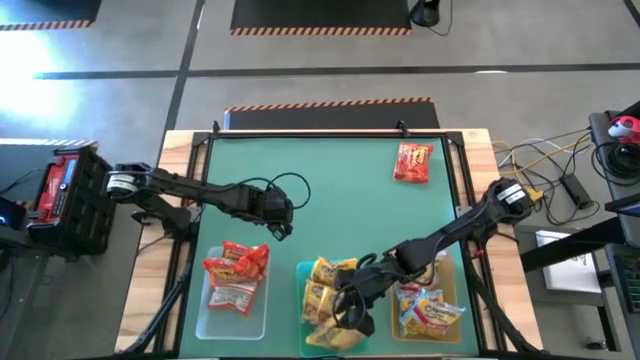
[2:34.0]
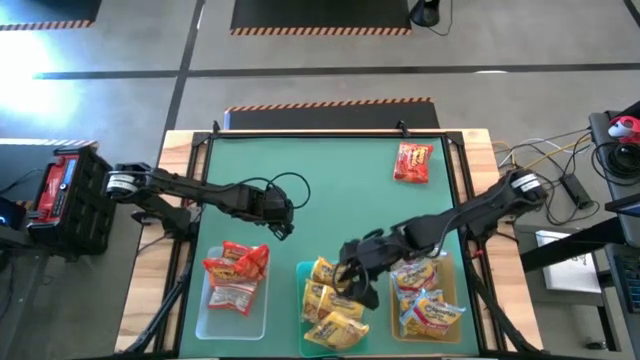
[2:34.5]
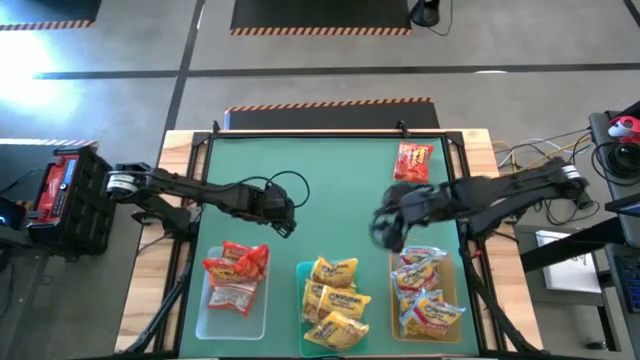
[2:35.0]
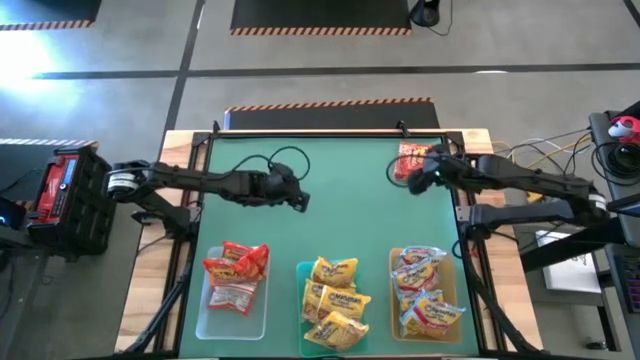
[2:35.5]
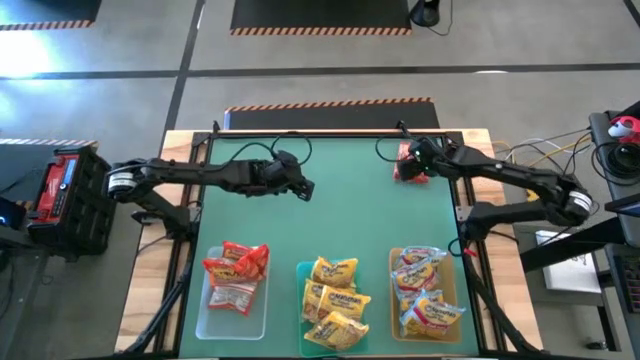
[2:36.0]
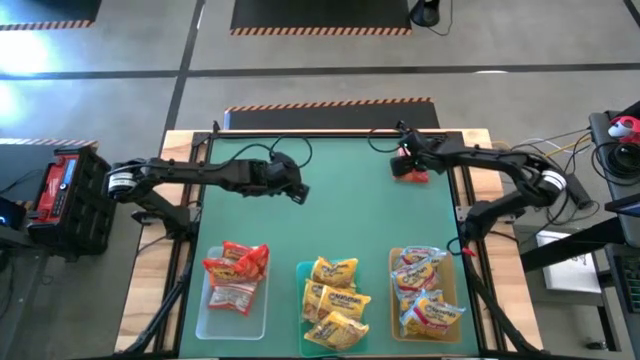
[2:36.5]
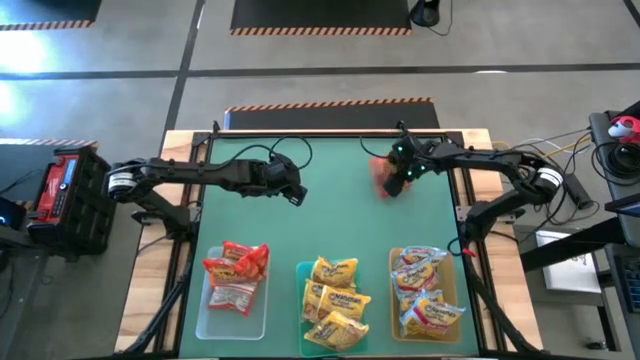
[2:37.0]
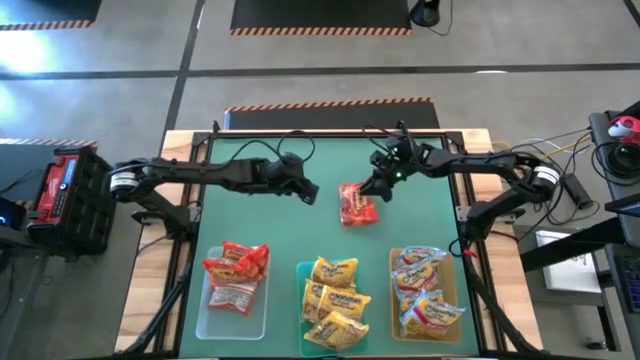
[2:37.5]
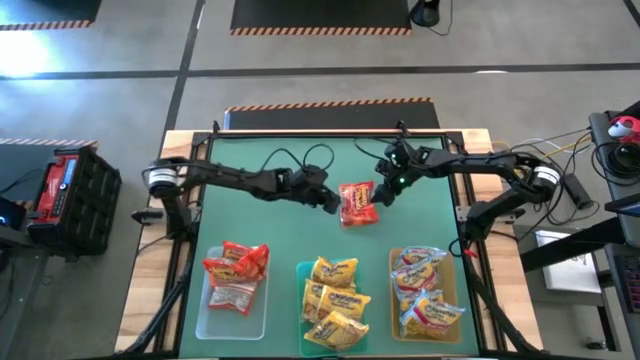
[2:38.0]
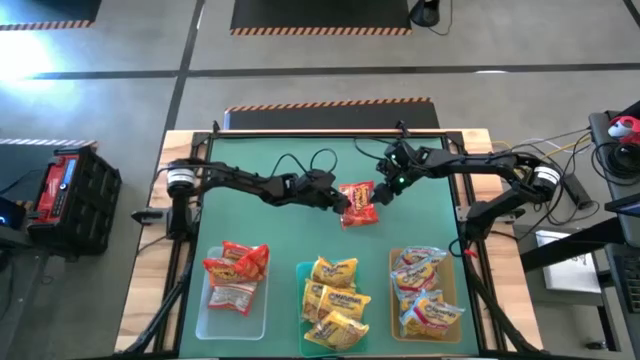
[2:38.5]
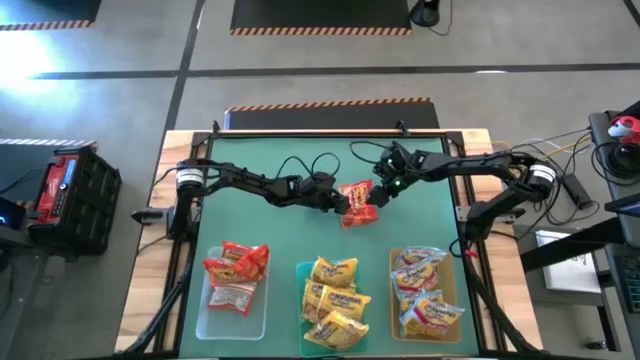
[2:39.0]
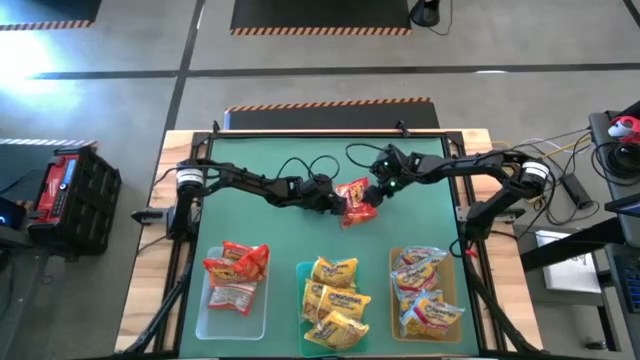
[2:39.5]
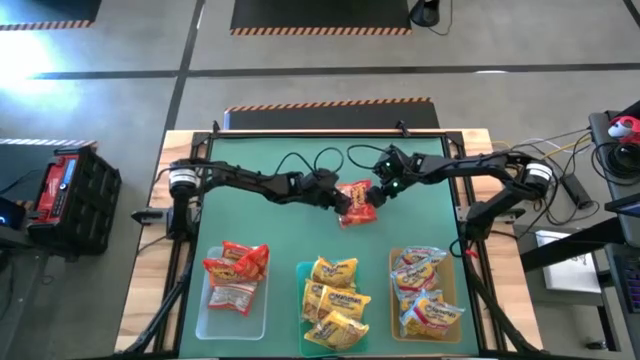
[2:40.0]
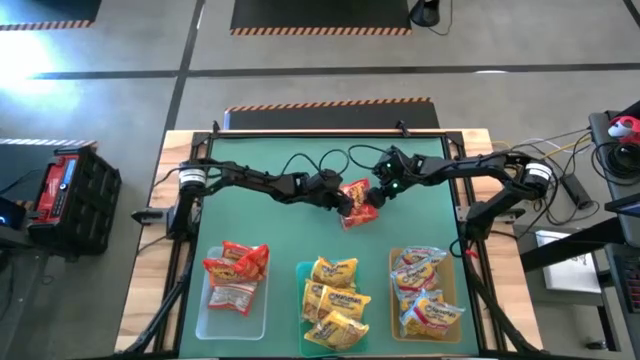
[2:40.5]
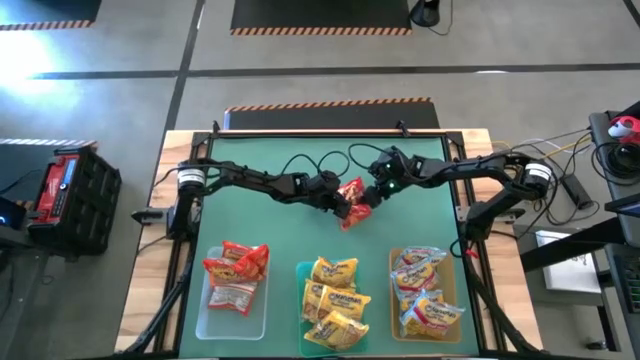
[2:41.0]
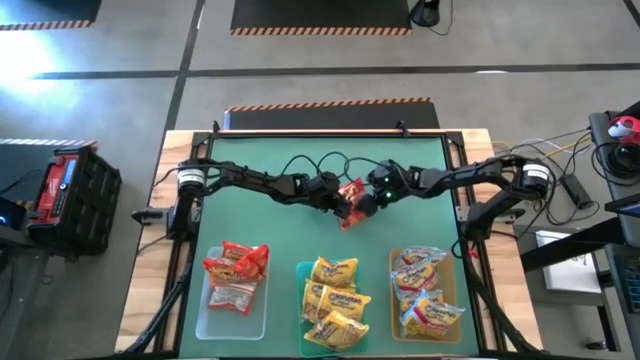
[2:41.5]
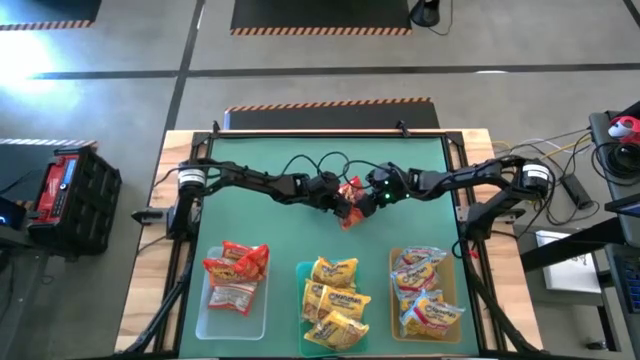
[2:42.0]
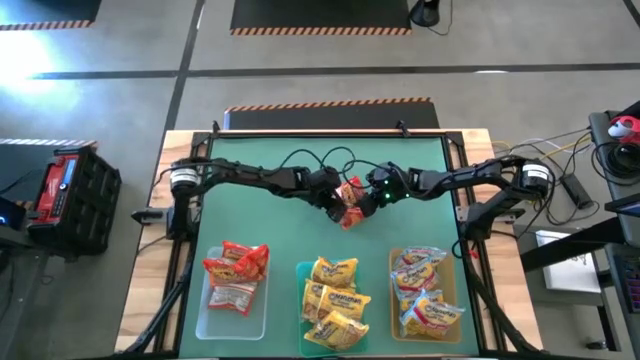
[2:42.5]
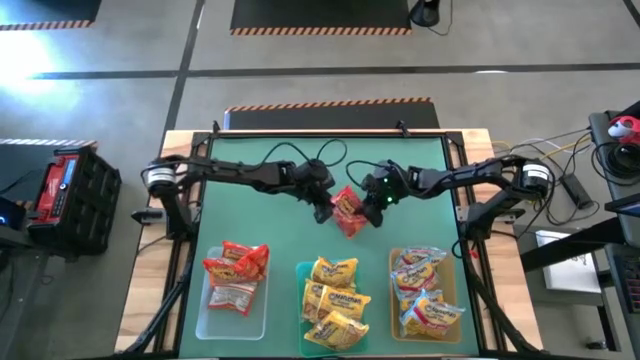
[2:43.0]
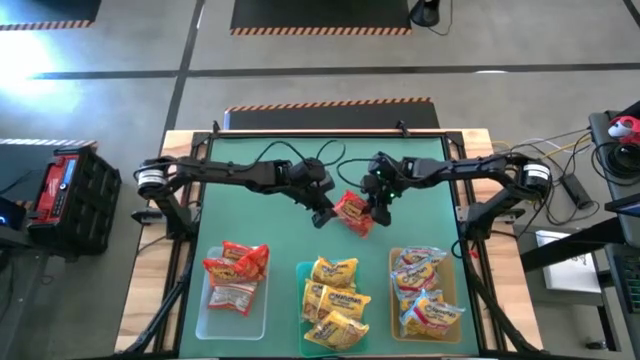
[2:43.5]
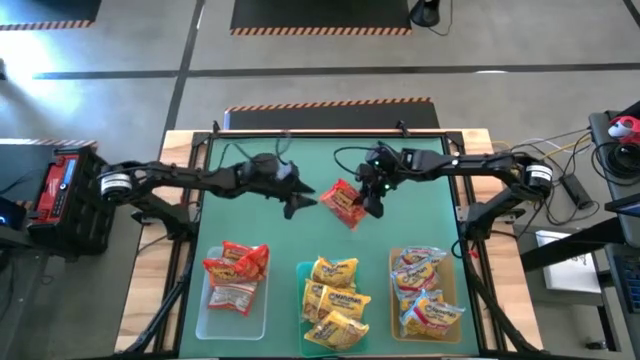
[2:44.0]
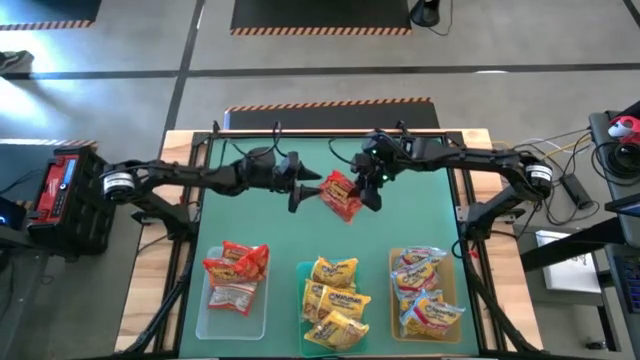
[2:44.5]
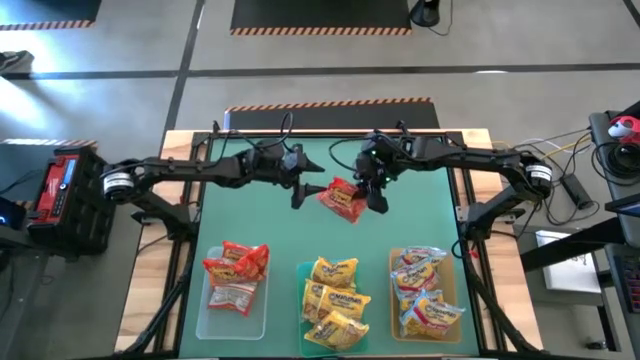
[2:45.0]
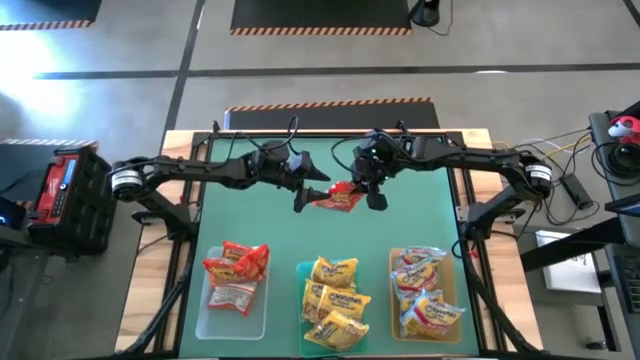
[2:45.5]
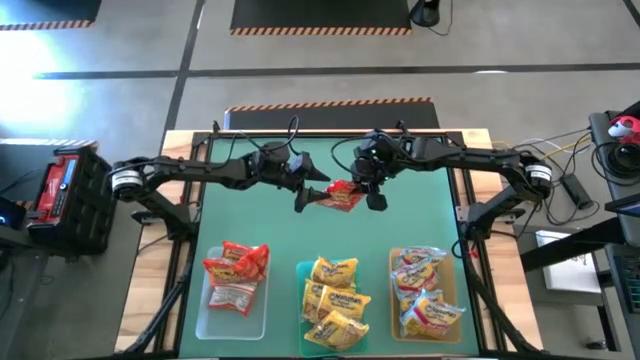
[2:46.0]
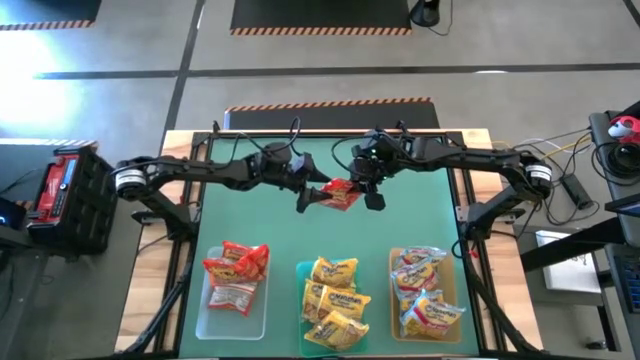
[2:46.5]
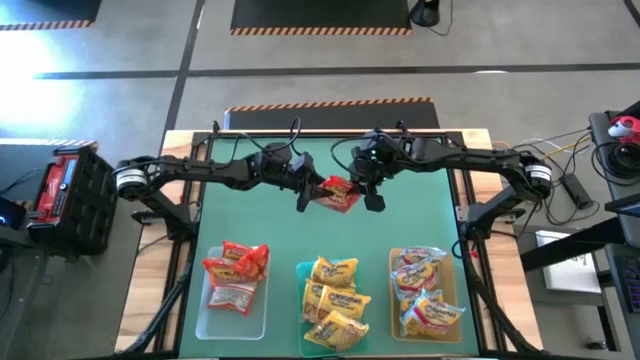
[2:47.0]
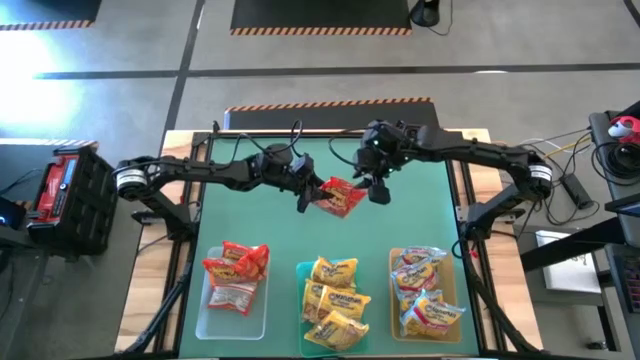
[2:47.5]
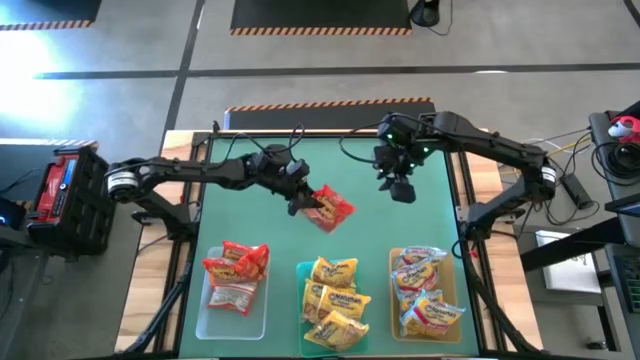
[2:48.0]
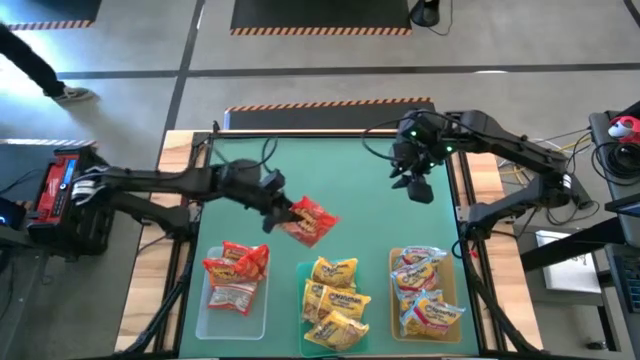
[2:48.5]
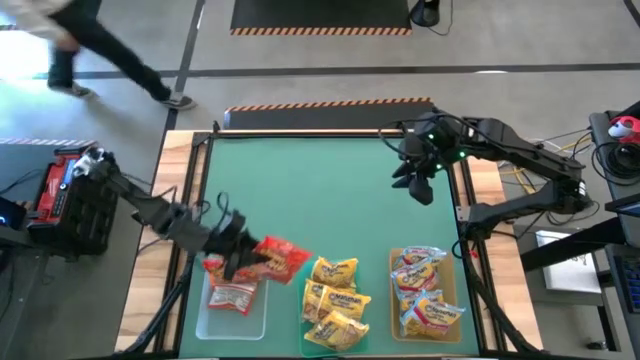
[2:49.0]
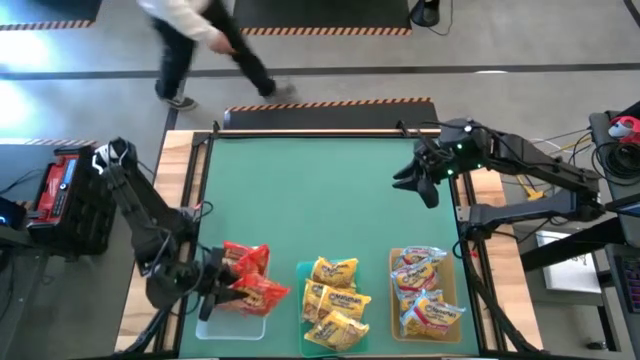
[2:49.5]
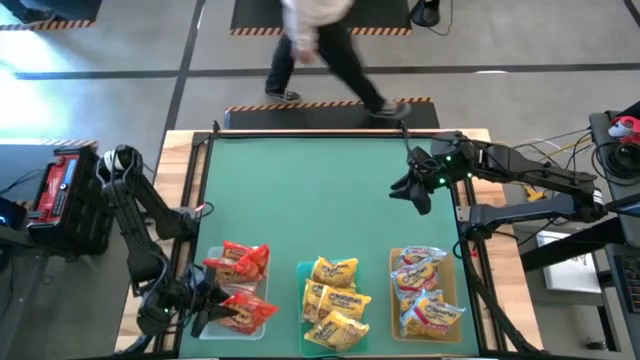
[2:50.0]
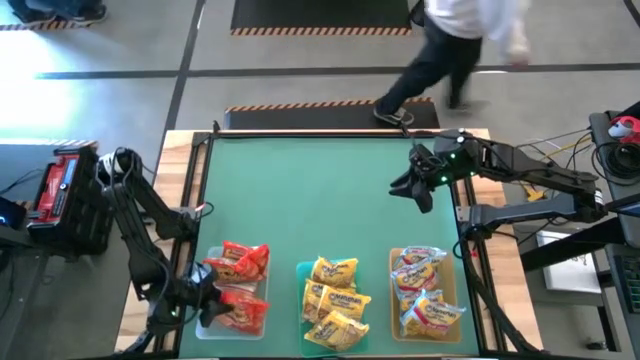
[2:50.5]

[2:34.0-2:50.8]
Task: Sort Maruchan noodles
Put the orange noodle pack into the white bin

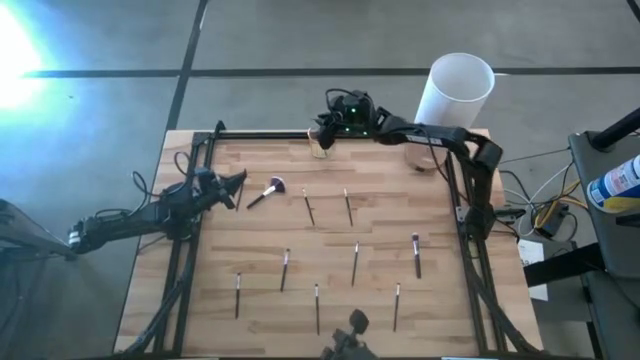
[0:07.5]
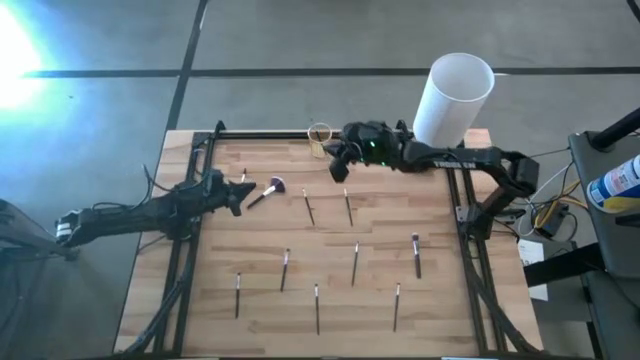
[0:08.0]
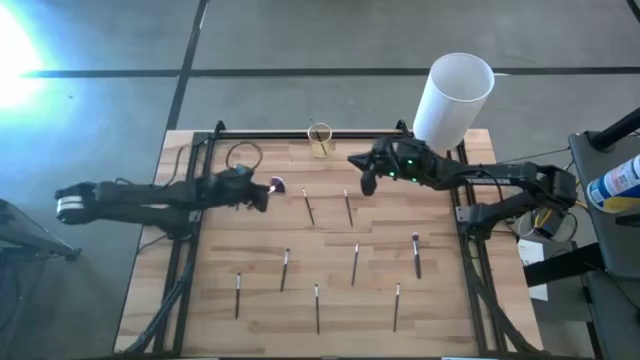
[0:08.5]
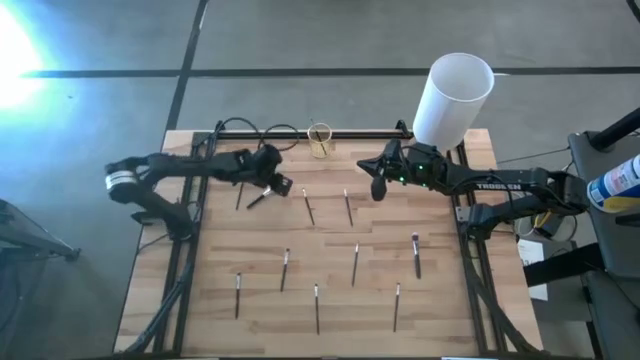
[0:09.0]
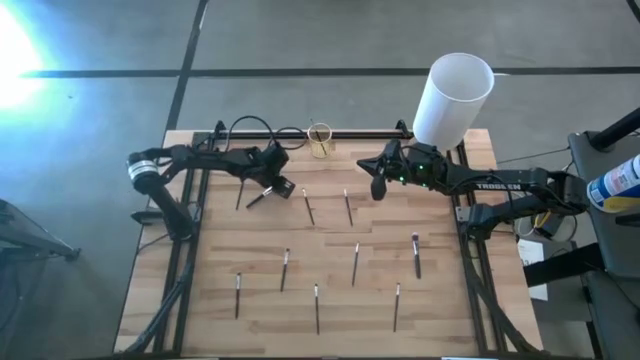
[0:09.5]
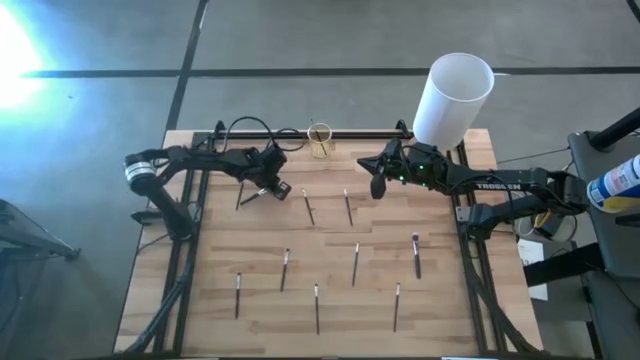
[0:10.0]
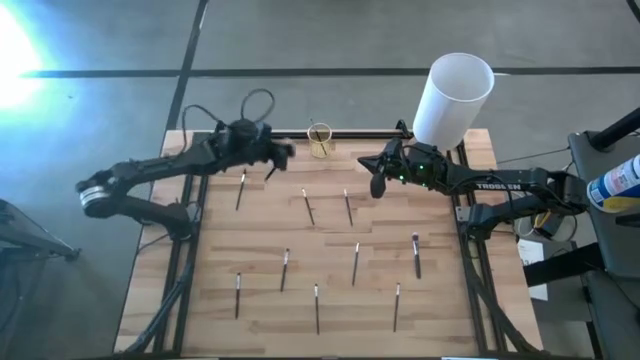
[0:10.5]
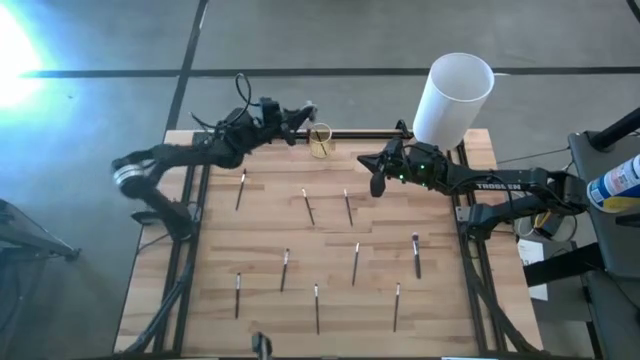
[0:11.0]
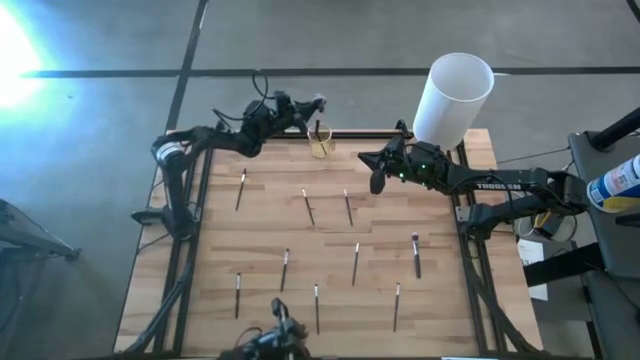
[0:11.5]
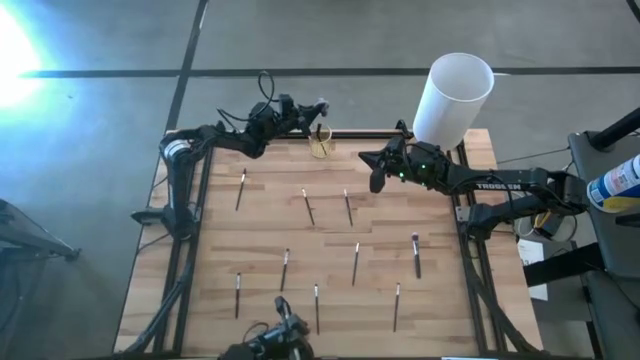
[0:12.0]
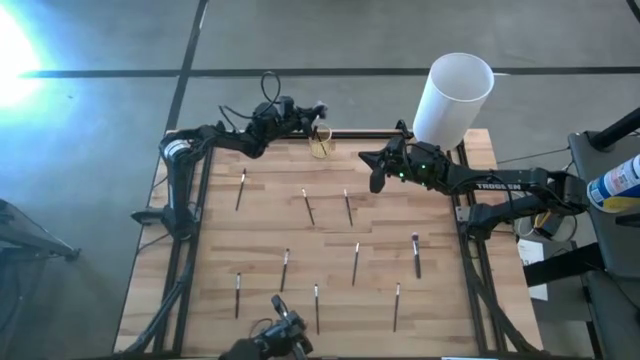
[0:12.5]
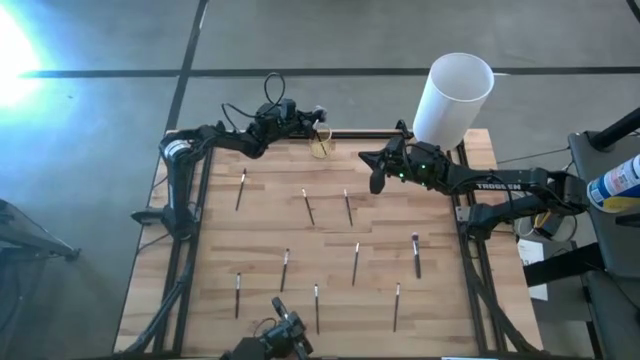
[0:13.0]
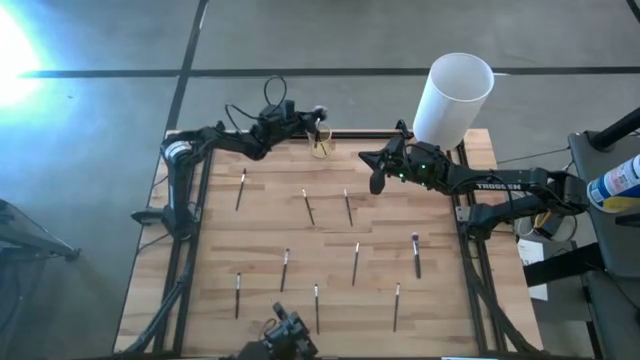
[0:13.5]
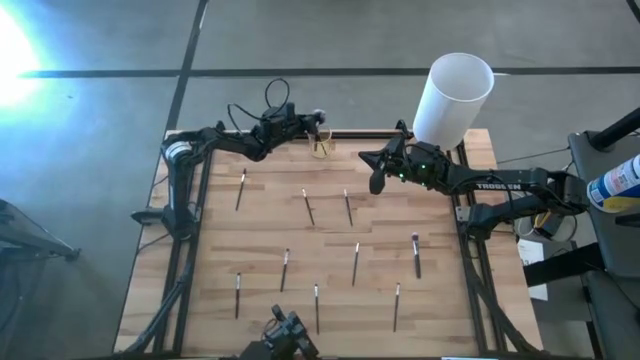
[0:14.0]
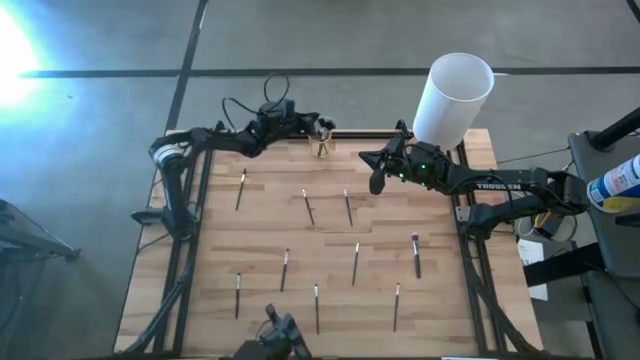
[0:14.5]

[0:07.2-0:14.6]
Task: Put items in baskets/containers
Put the black highlighter brush into the yellow pen holder
